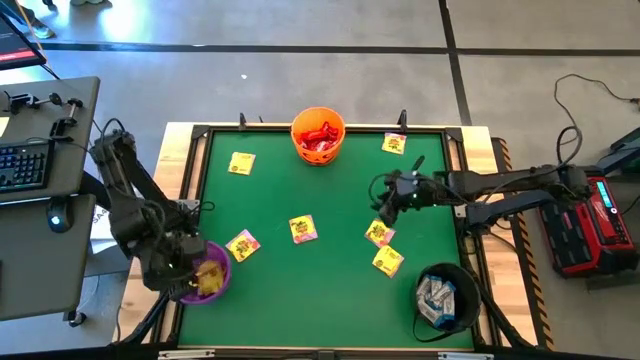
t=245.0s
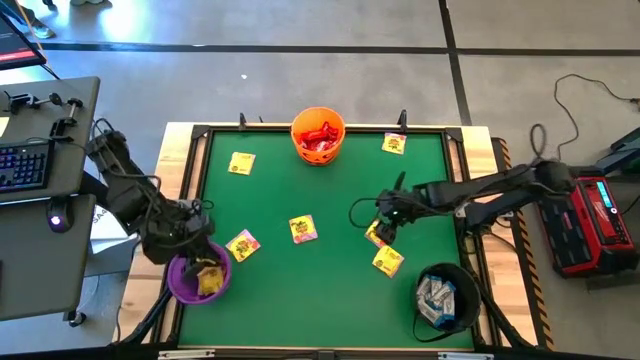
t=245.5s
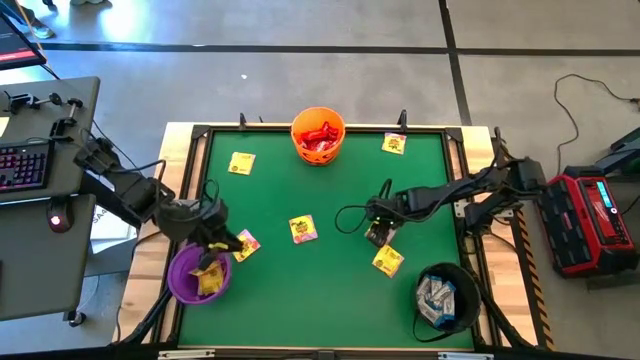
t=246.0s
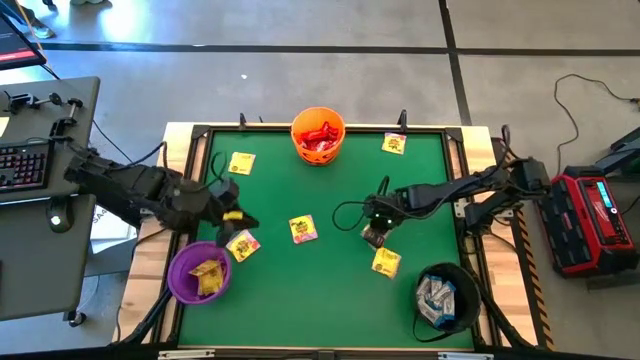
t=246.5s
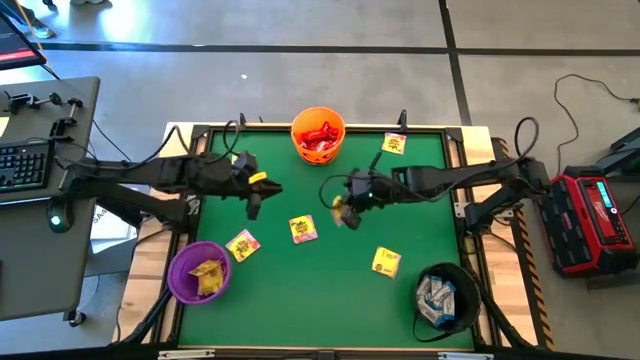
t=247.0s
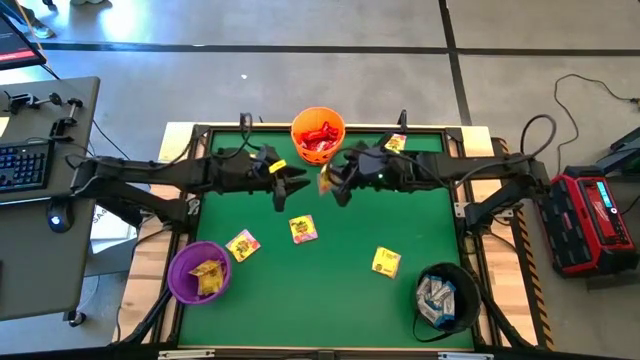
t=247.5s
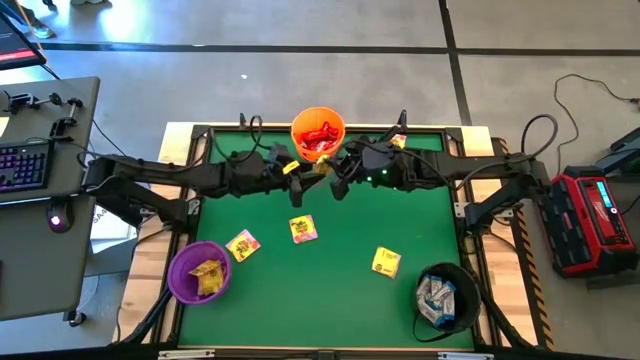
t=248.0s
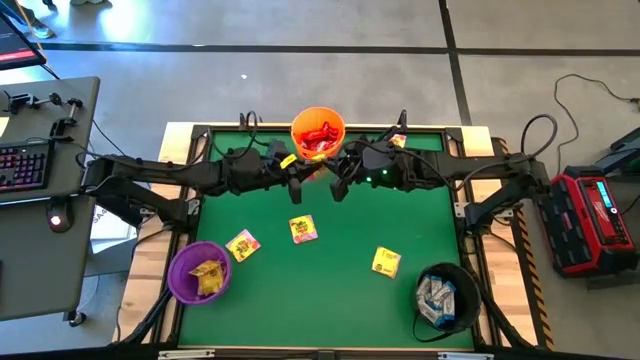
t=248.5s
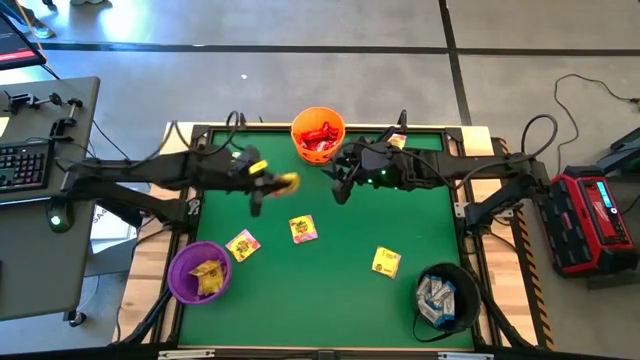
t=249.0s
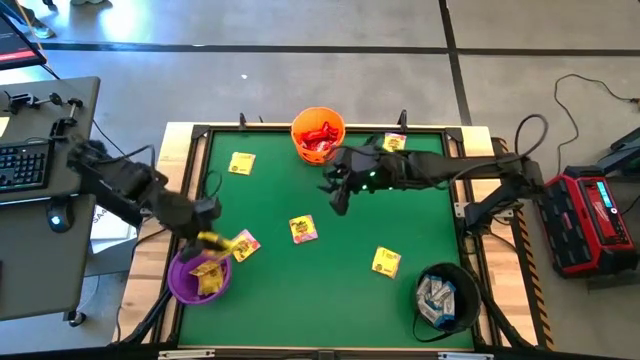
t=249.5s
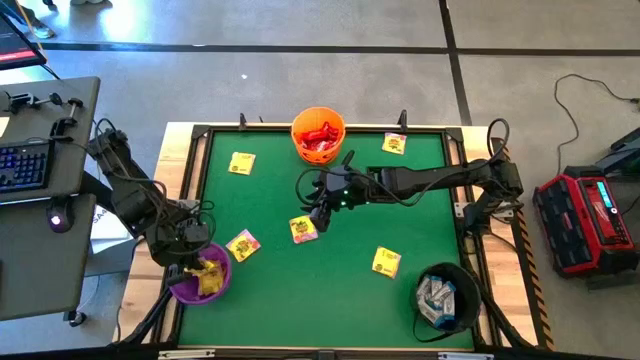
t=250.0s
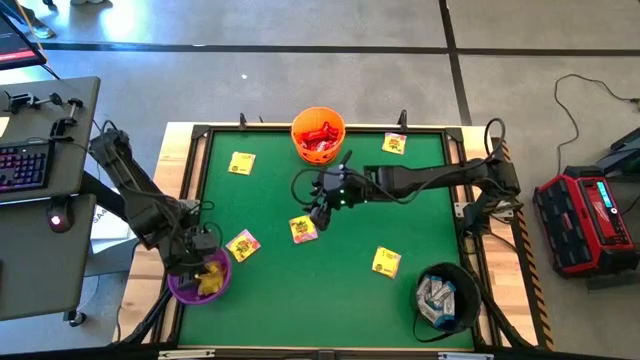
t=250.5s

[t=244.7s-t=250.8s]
Task: Sort candy by brand, put in halloween buckets
Put the yellow candy into the purple bucket

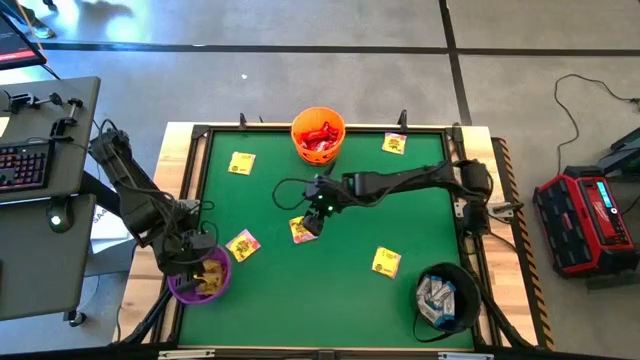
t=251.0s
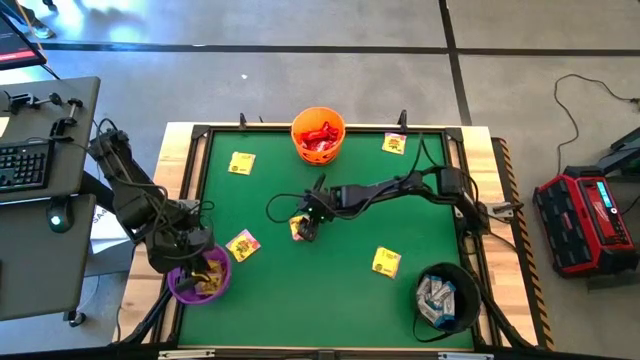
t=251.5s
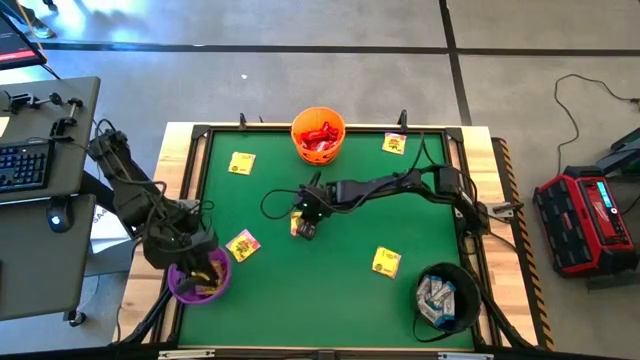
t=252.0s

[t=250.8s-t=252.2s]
Put the yellow candy into the purple bucket

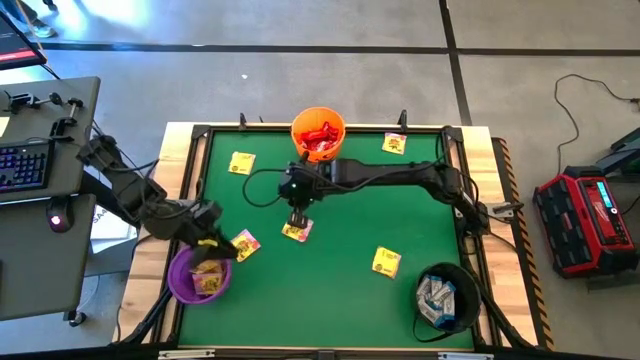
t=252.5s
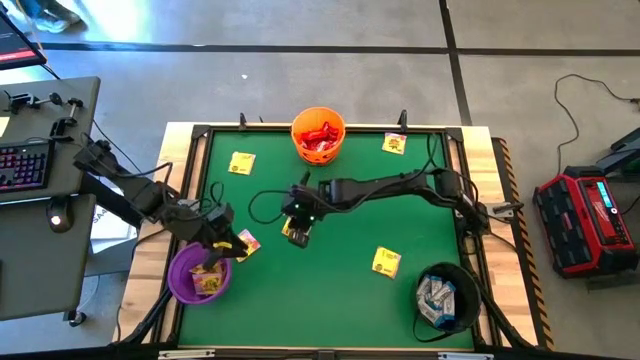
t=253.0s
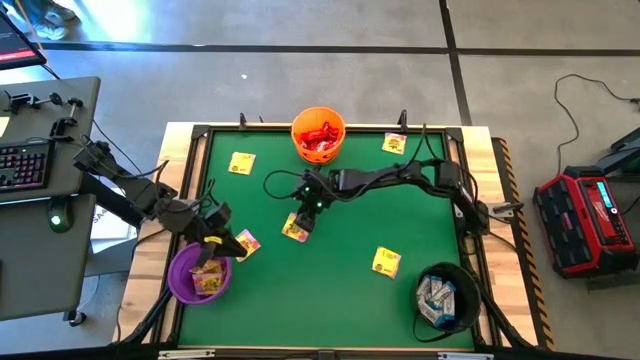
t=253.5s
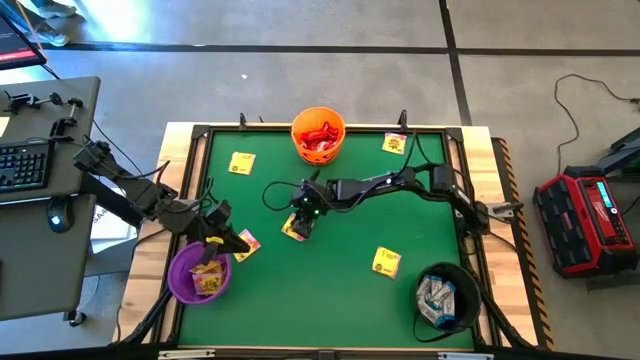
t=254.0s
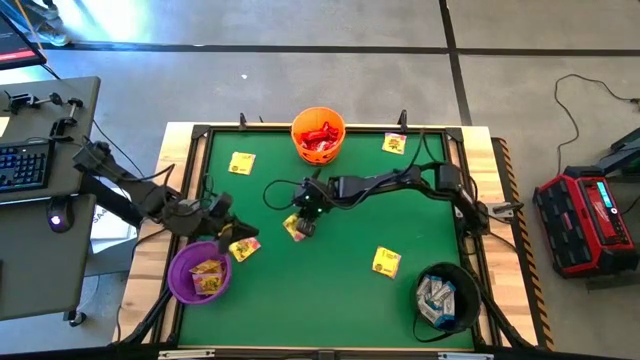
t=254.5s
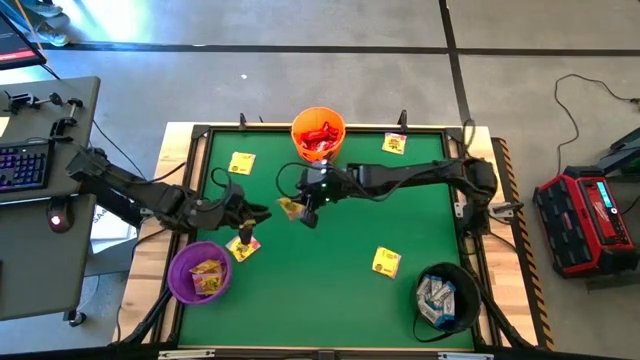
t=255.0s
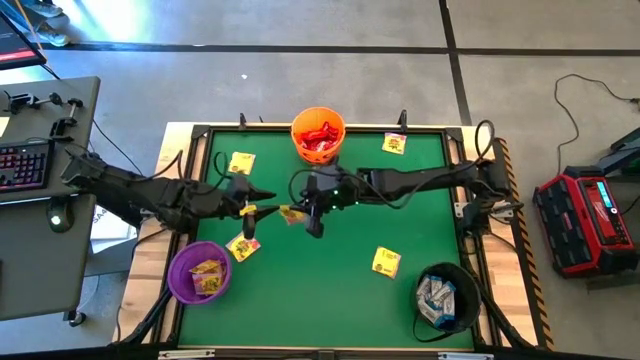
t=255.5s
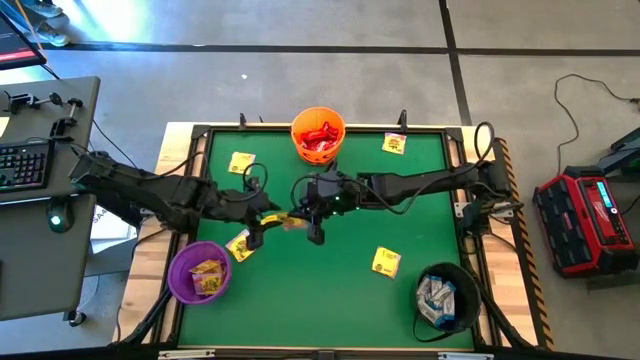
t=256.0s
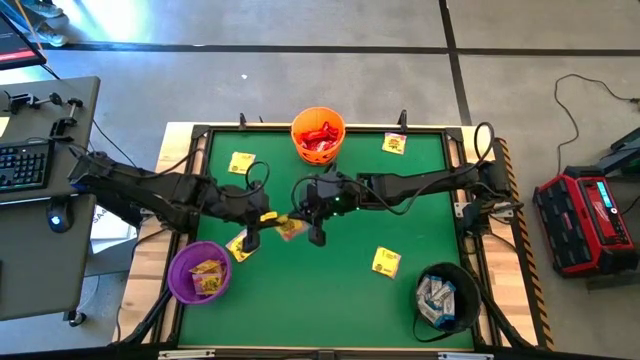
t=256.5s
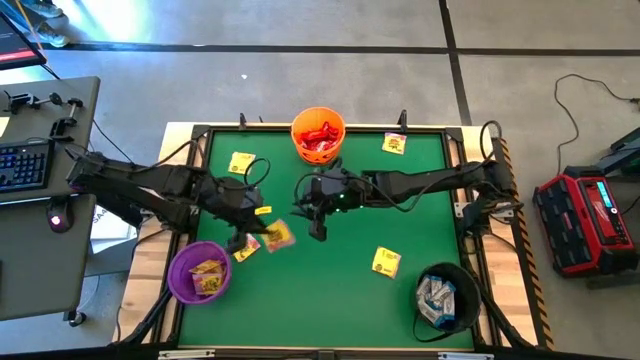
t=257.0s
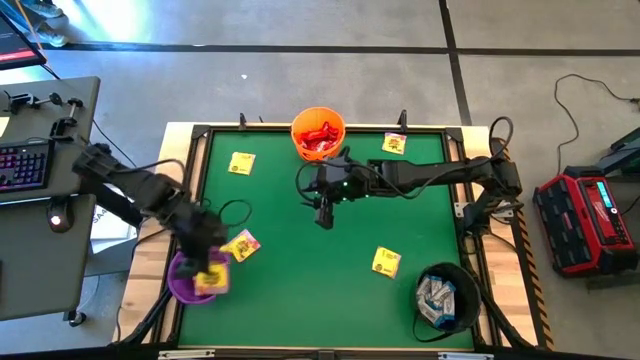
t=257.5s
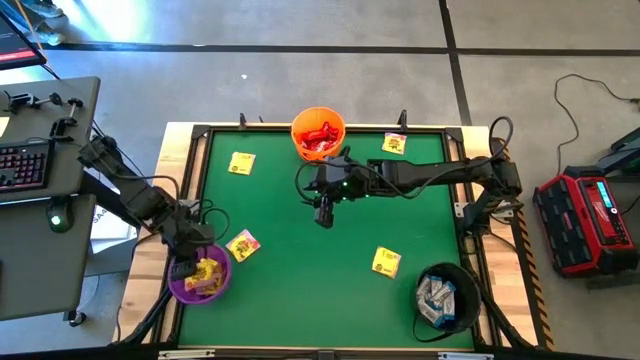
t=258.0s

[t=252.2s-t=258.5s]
Put the yellow candy into the purple bucket

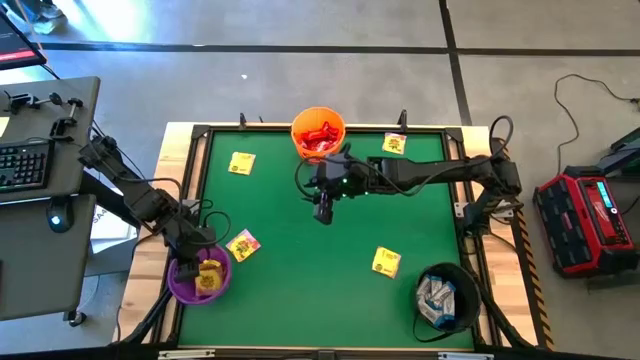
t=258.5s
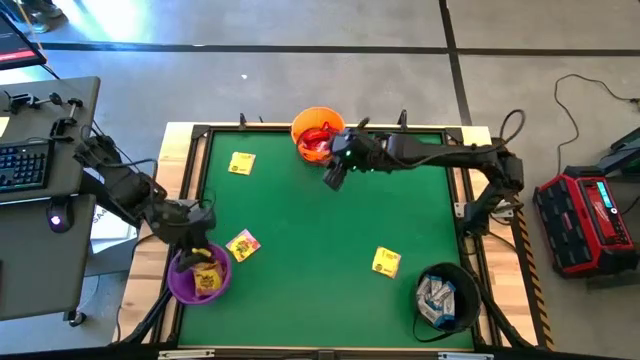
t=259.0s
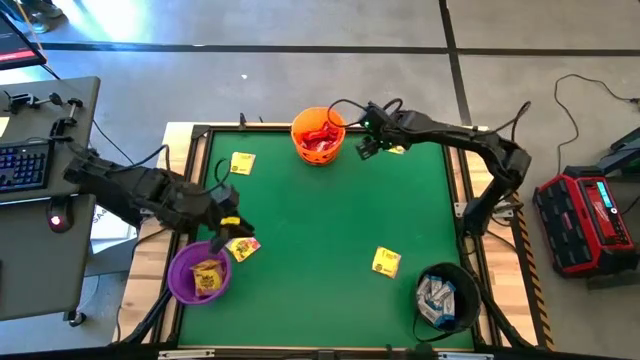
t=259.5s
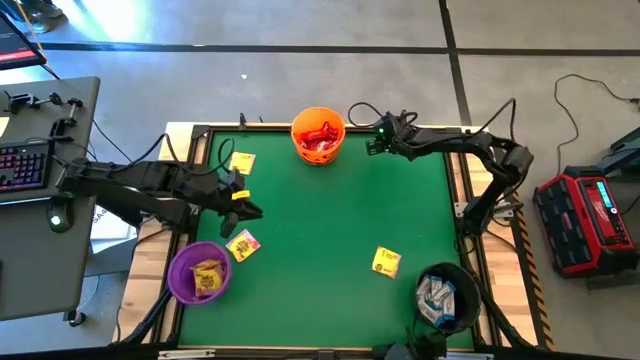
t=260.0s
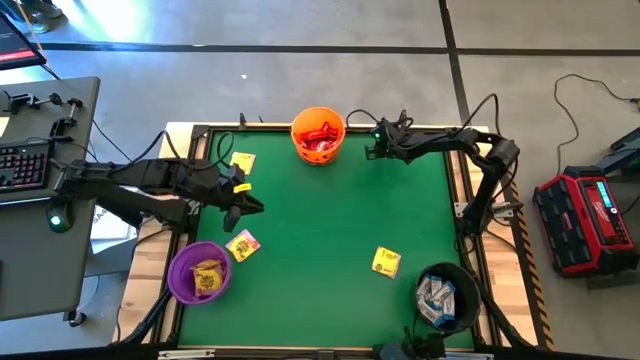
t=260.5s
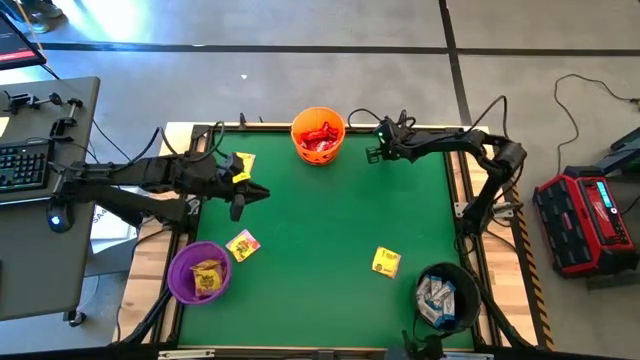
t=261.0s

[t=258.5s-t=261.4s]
Put the yellow candy into the purple bucket

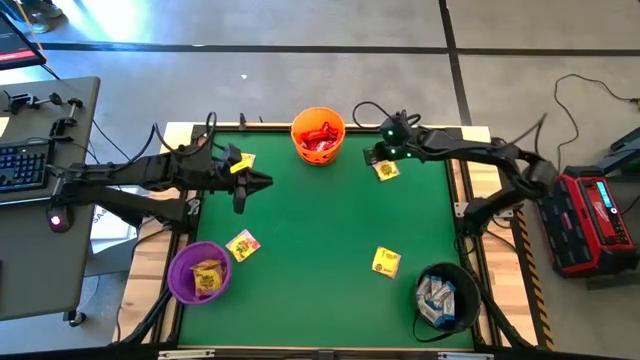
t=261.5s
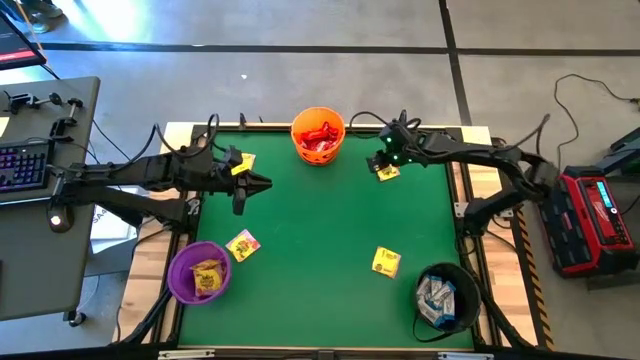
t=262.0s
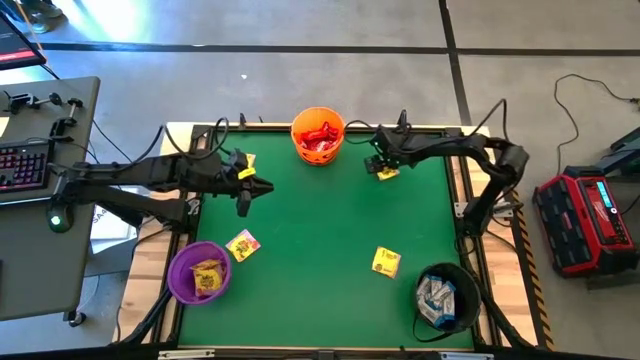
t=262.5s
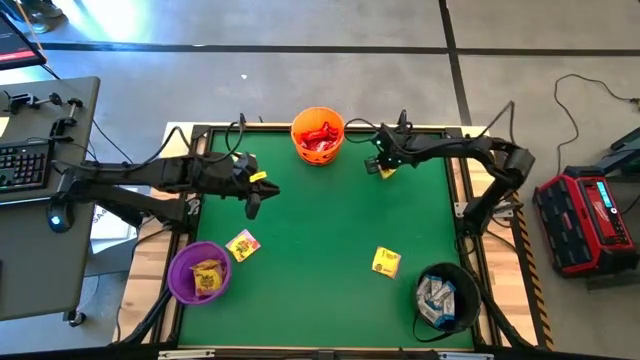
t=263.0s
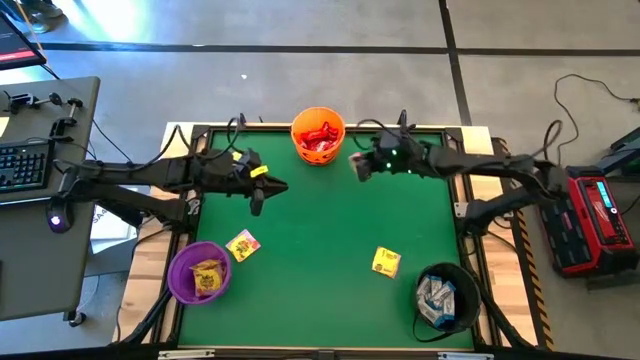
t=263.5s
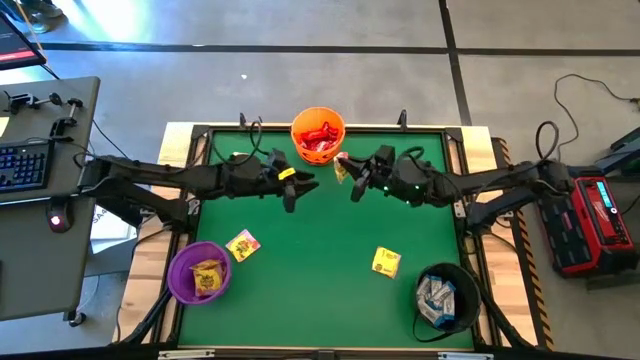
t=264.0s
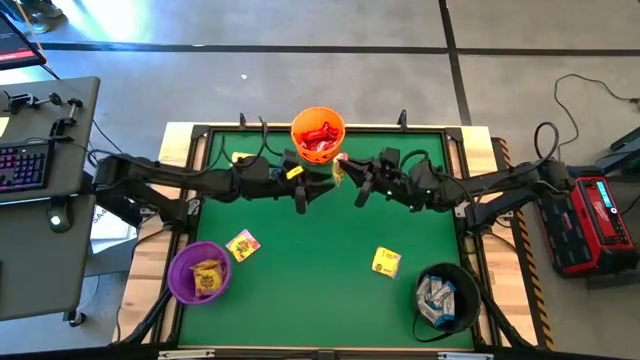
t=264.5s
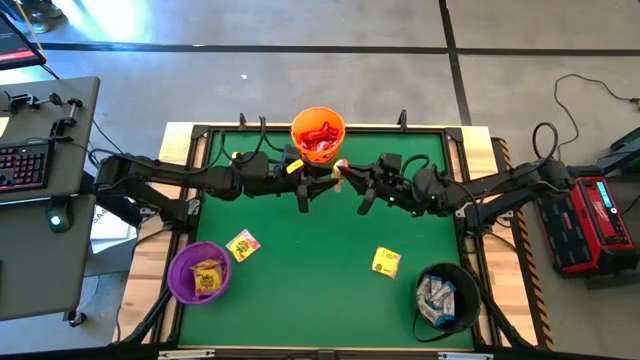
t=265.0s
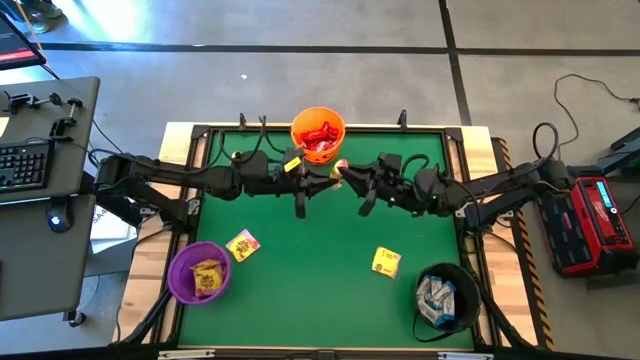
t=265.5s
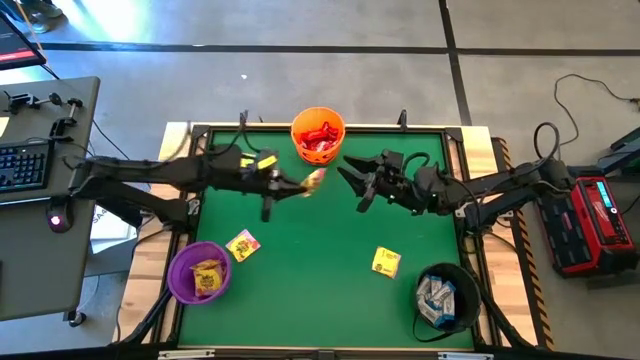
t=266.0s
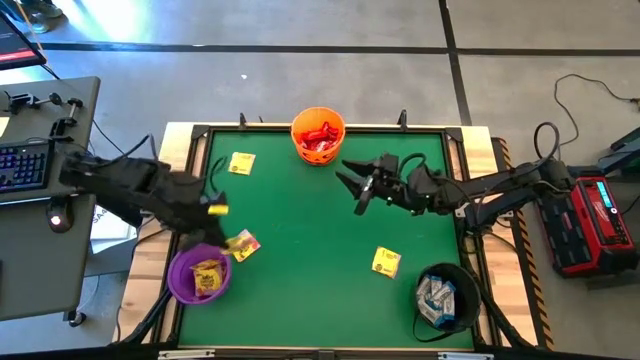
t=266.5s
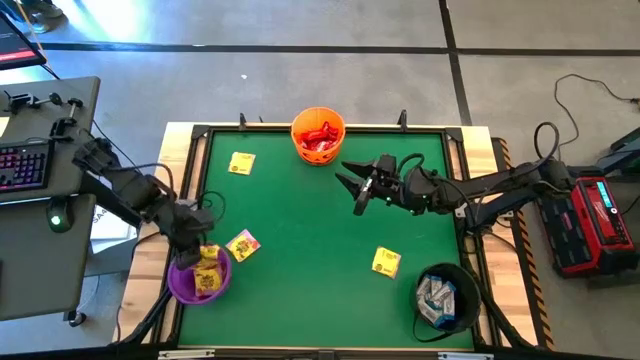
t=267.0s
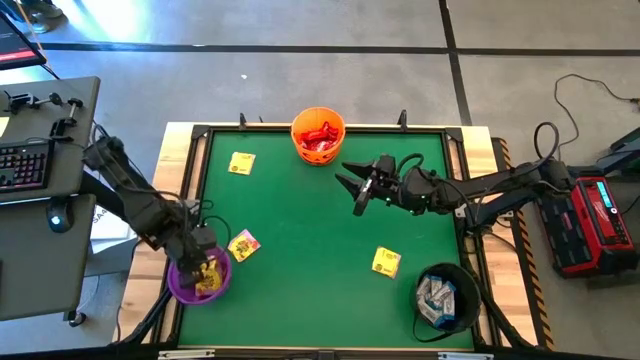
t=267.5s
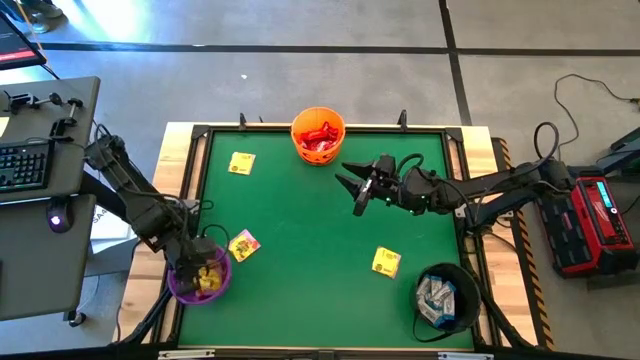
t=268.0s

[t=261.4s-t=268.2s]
Put the yellow candy into the purple bucket
